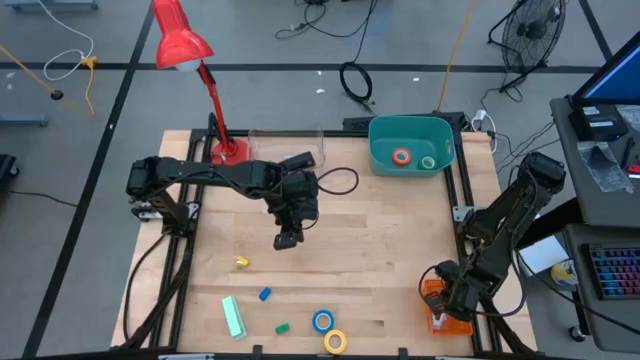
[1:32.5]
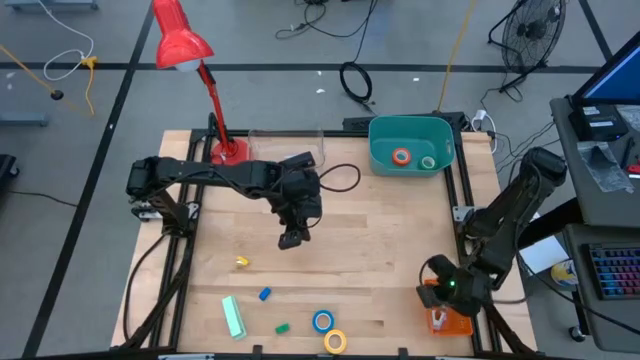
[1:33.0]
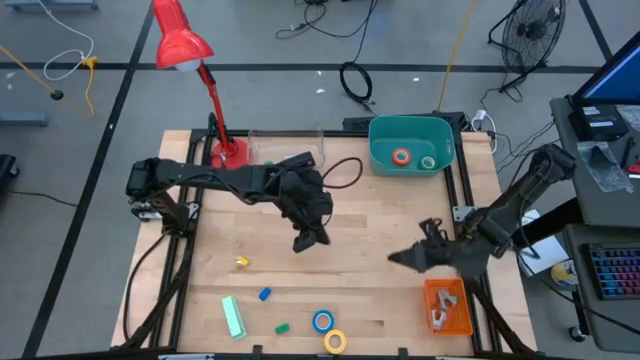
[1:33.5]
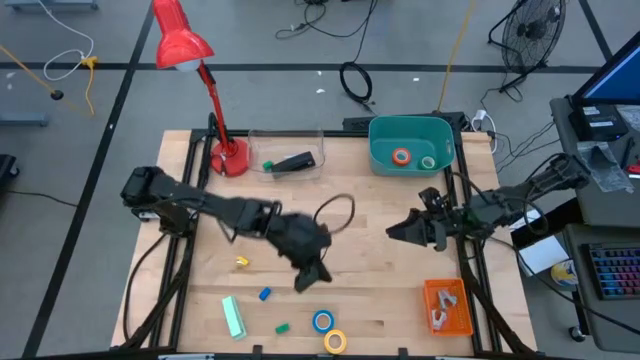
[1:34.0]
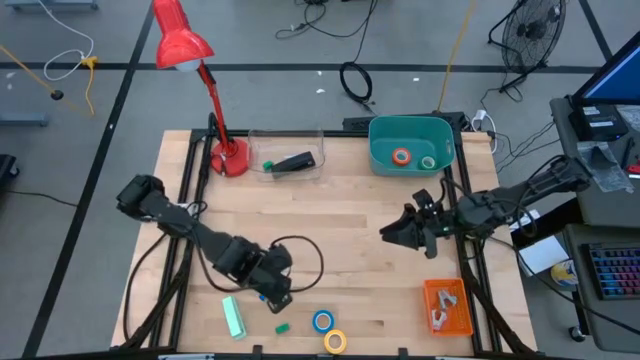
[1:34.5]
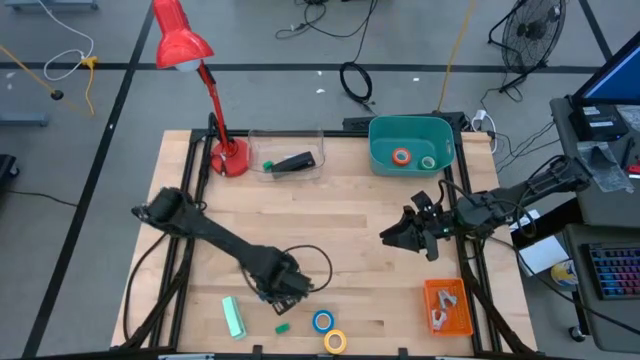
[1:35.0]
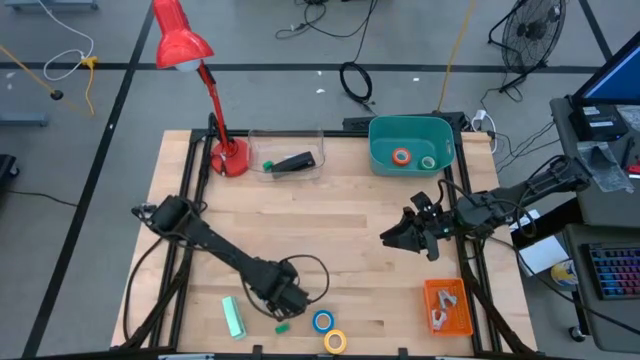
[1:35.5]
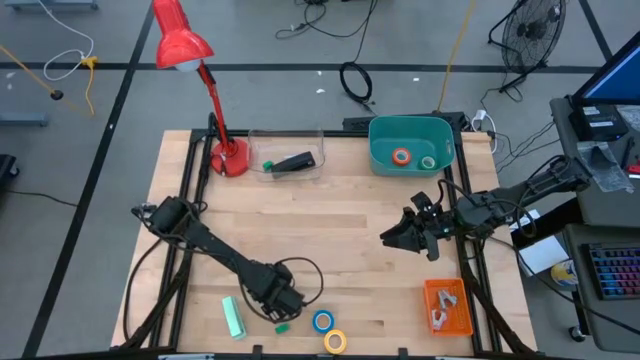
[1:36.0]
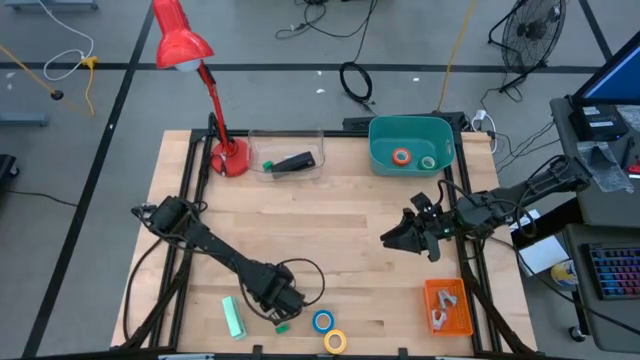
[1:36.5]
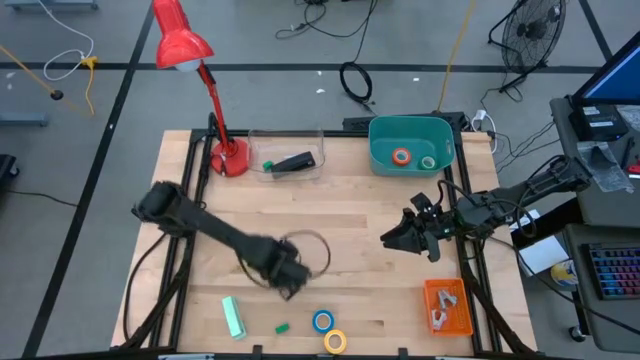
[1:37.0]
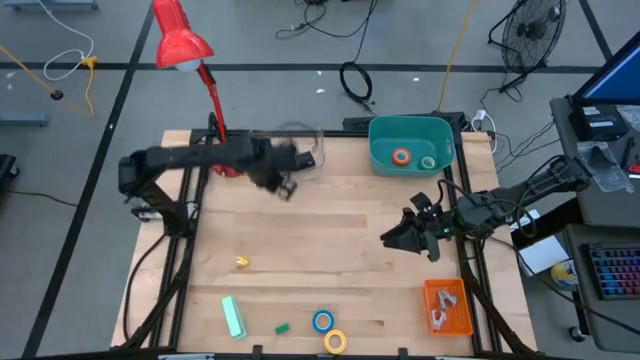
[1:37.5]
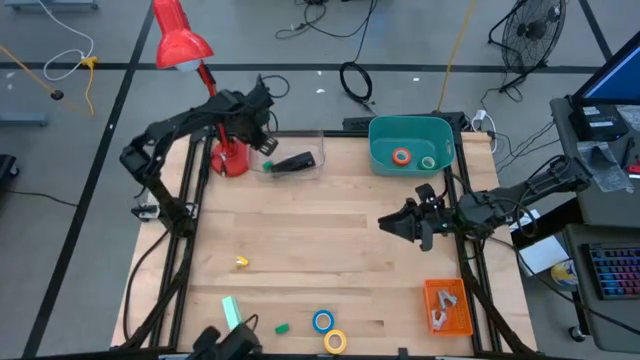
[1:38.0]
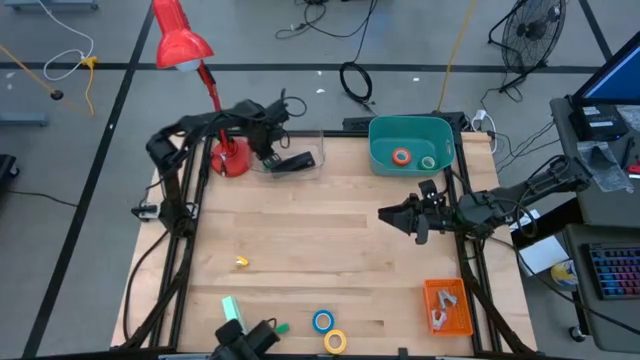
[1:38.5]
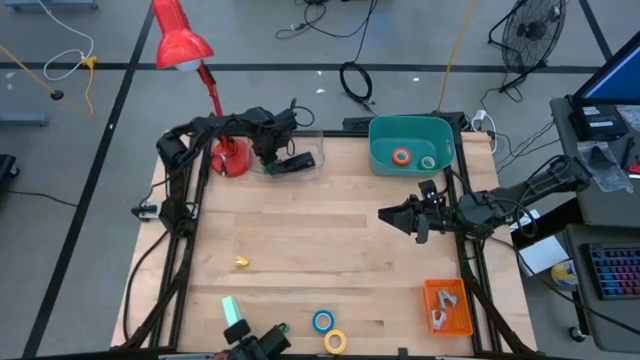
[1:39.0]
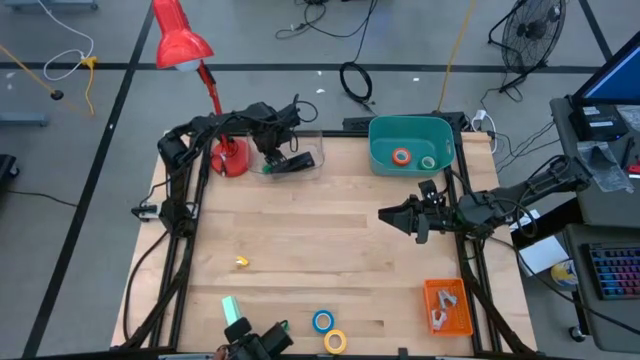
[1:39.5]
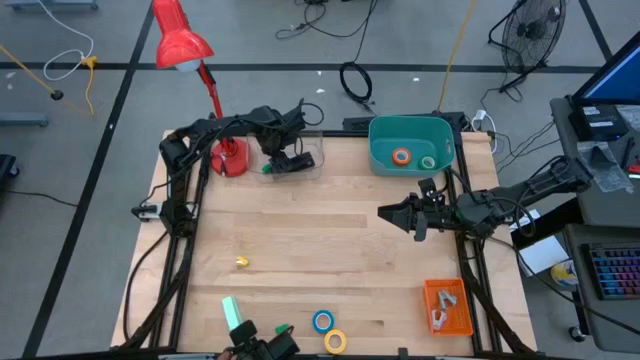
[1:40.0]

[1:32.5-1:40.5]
Task: Pick and place Stapler, Stapler remover, tape
Put the small blue stapler into the transparent bin

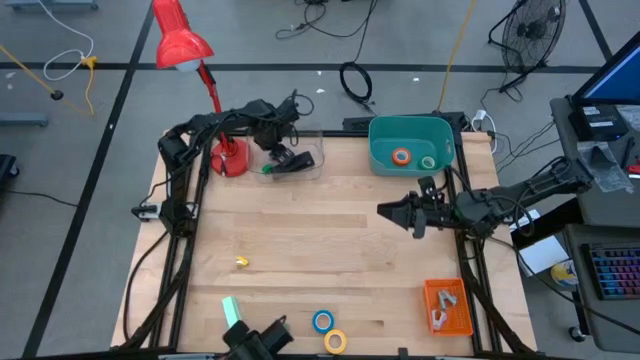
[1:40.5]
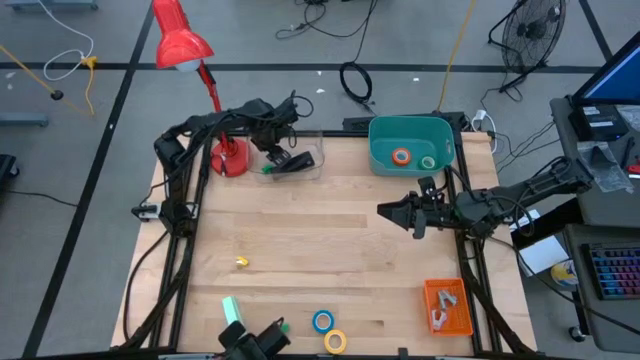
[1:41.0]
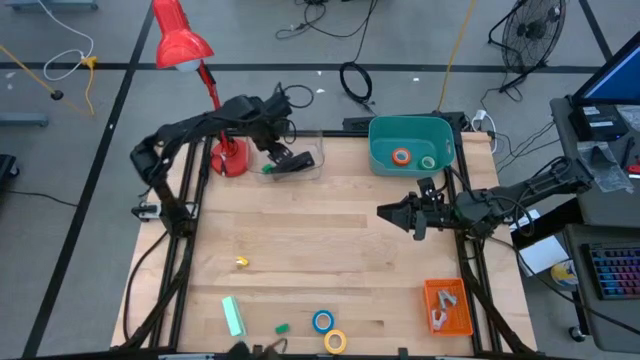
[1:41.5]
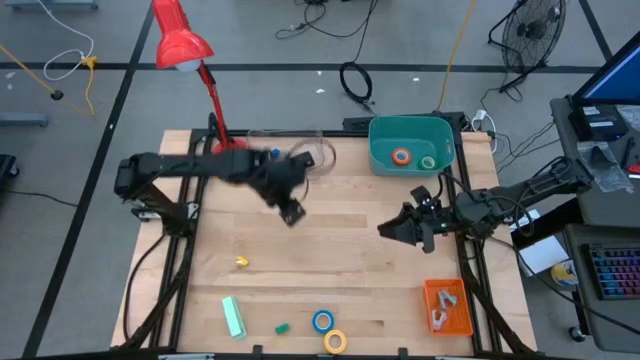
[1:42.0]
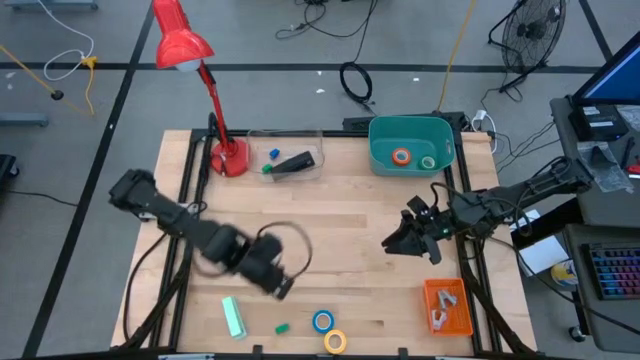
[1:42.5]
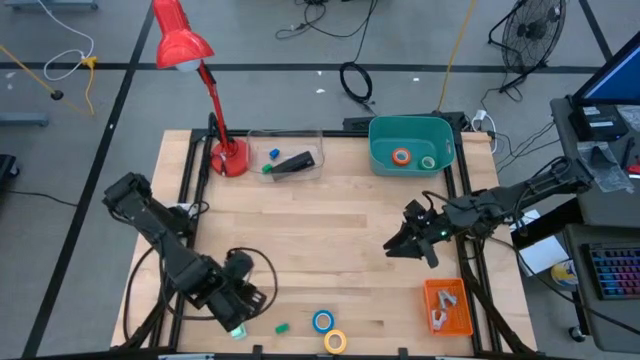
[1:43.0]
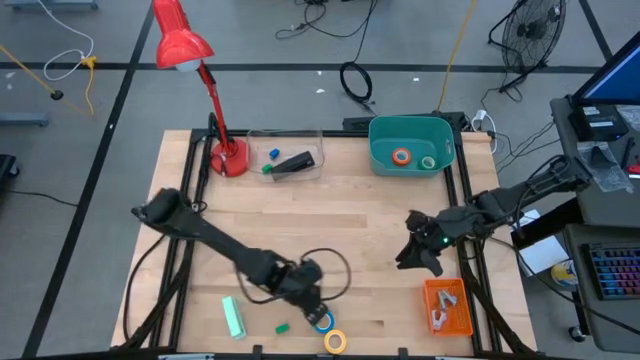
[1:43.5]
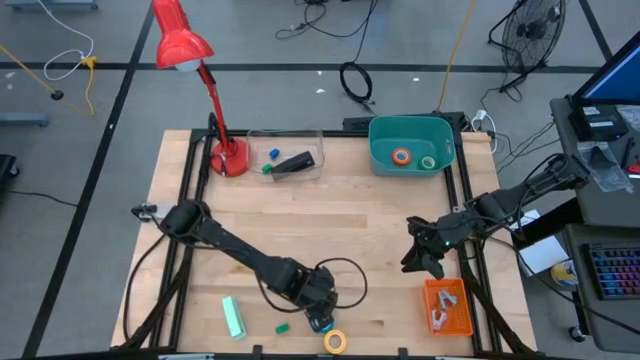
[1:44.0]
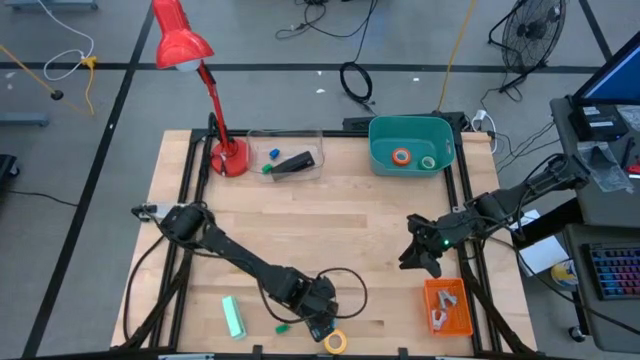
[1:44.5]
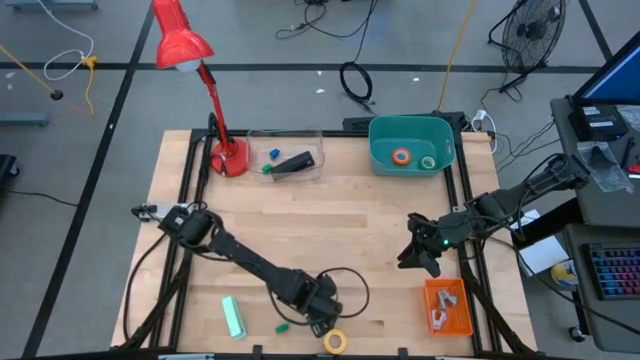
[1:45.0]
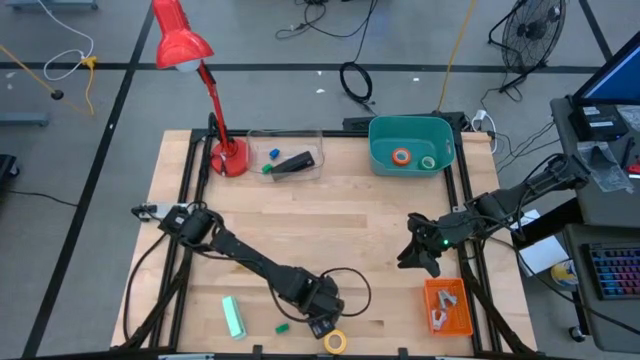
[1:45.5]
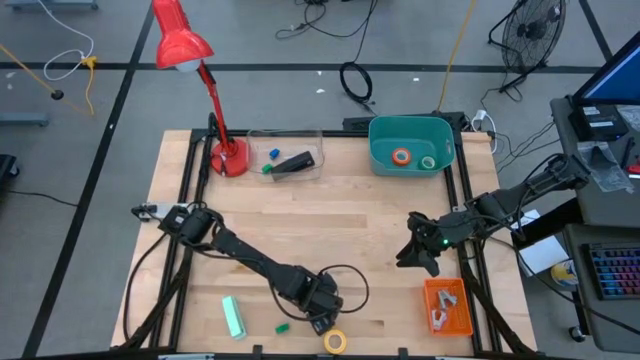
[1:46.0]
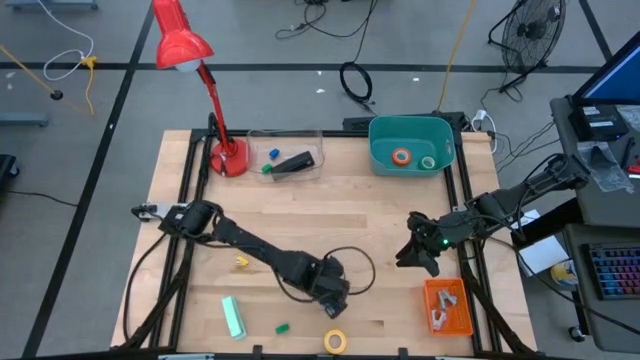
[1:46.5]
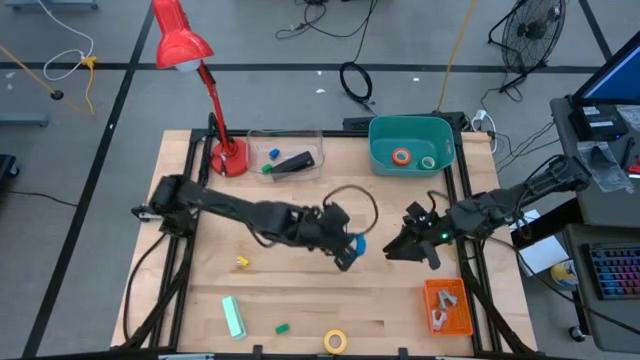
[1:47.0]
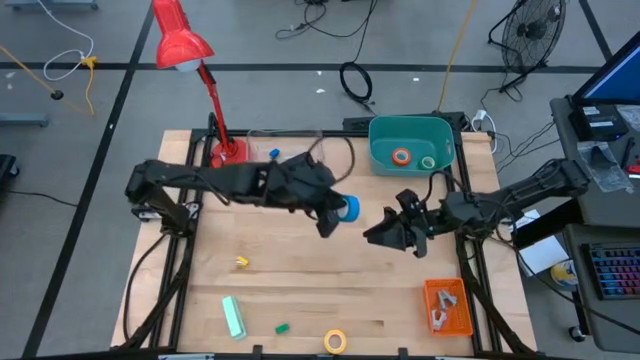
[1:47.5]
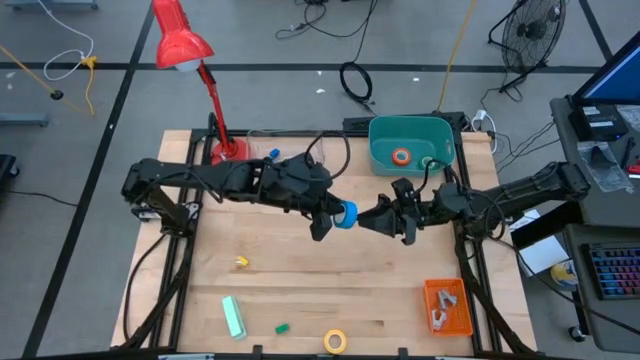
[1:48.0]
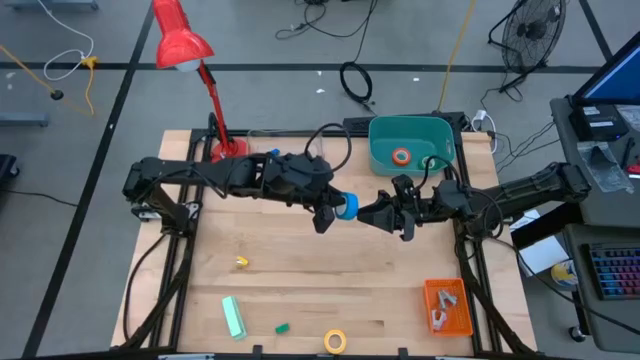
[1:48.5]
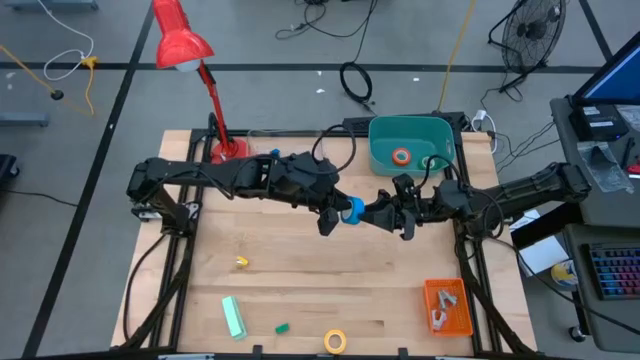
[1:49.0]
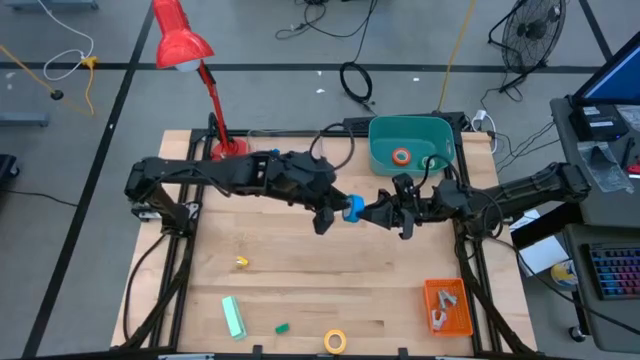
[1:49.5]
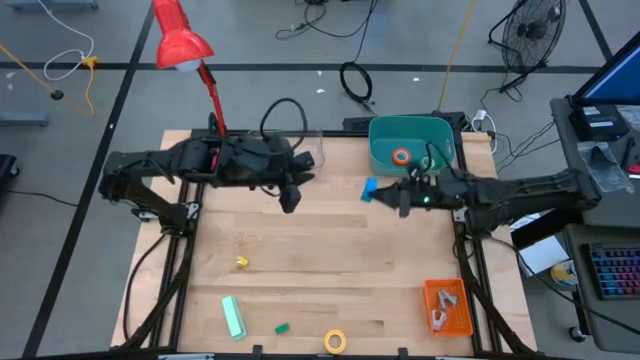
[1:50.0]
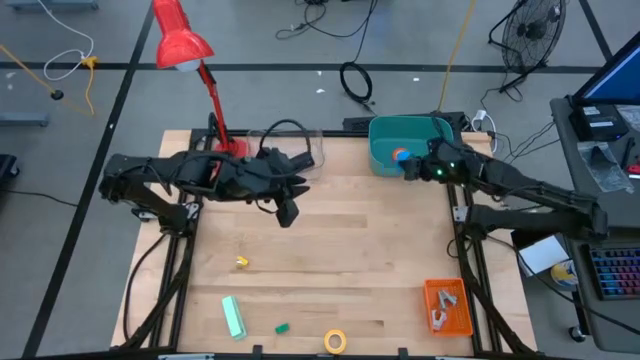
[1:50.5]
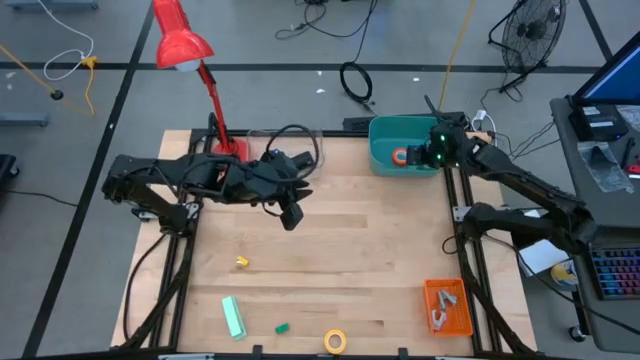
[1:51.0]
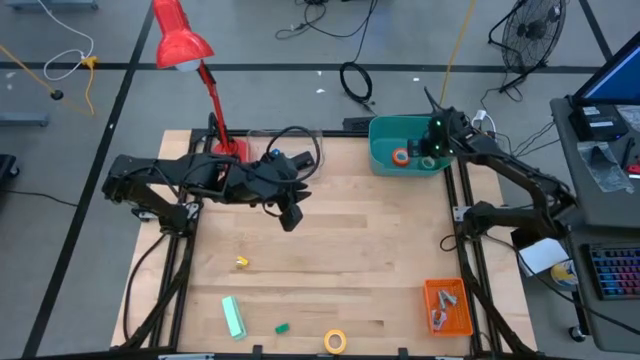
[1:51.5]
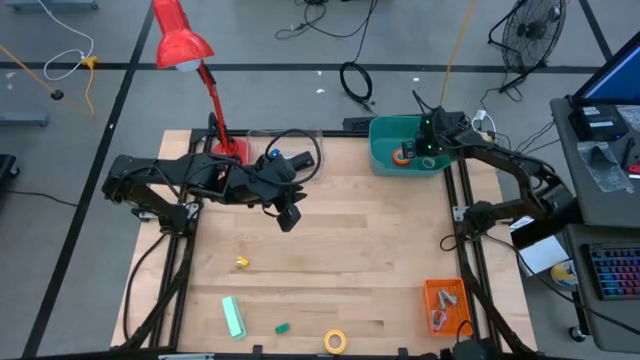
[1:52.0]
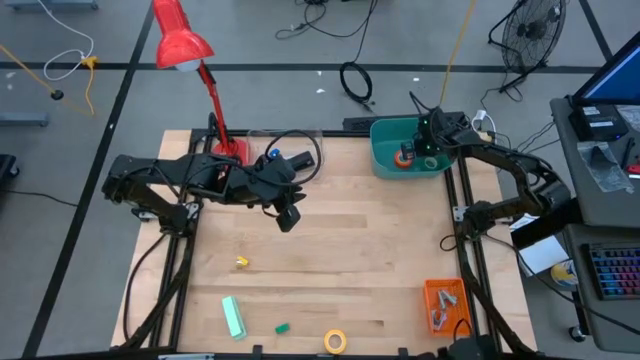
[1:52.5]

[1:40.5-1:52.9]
Put the blue tape into the blue bin

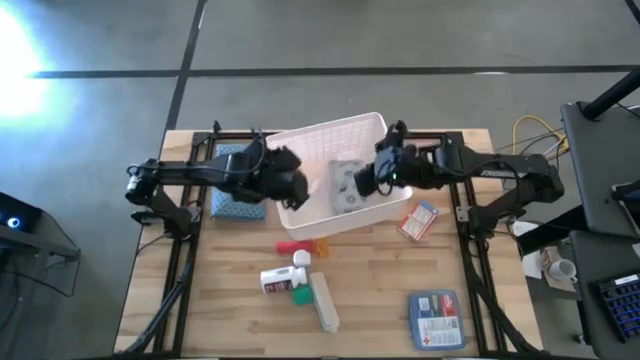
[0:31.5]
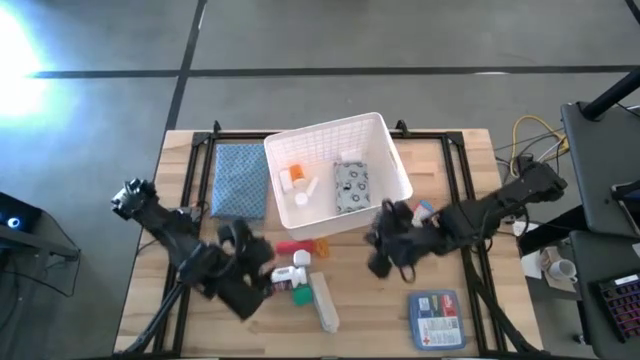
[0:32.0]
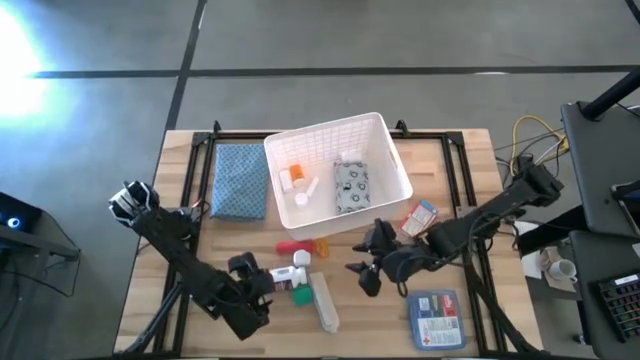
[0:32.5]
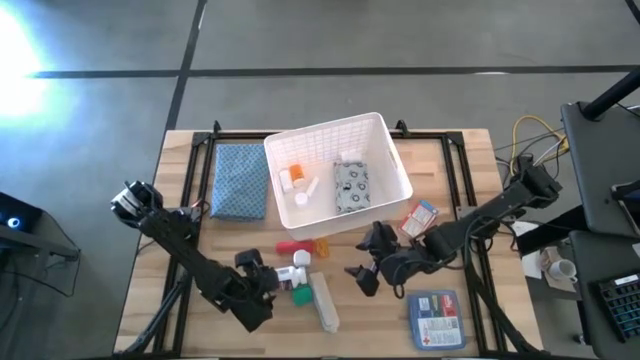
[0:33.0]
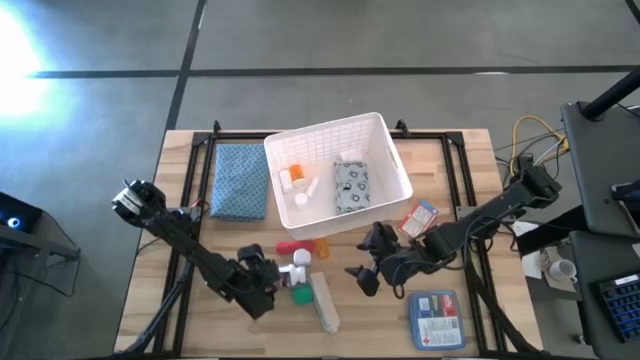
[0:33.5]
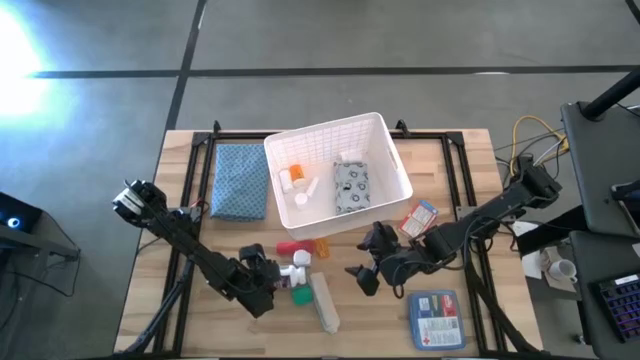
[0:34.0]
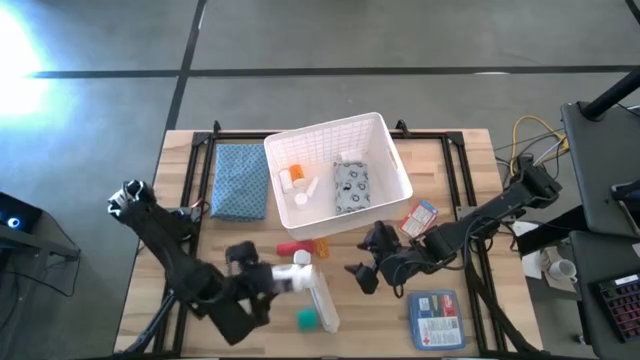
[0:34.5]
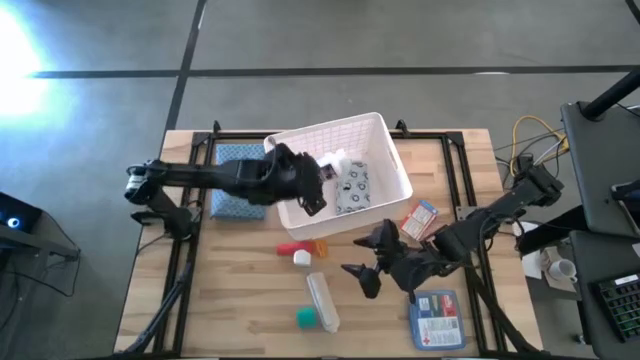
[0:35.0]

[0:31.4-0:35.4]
Task: Pick & place medical supplies in basket/bin
Put the violet pill bottle into the white bin
